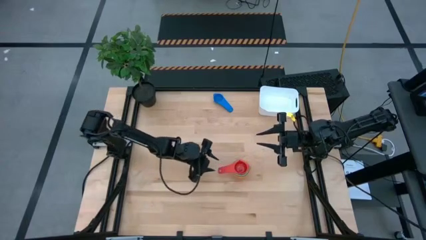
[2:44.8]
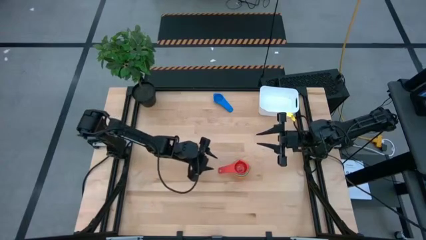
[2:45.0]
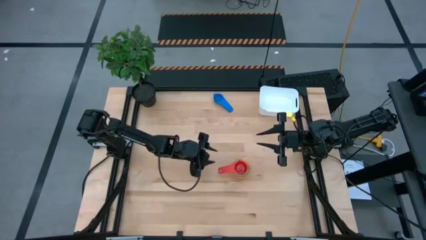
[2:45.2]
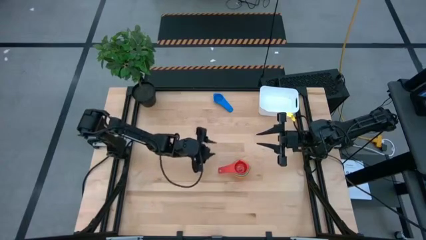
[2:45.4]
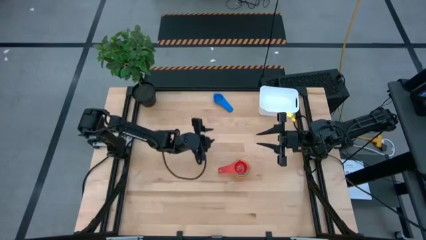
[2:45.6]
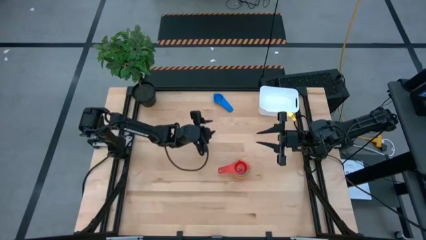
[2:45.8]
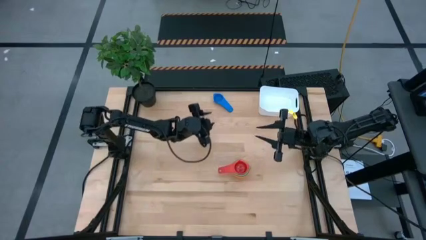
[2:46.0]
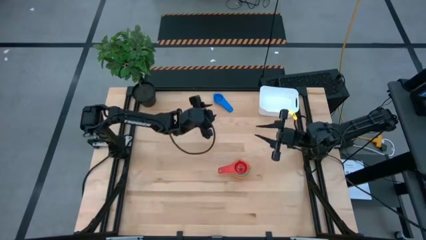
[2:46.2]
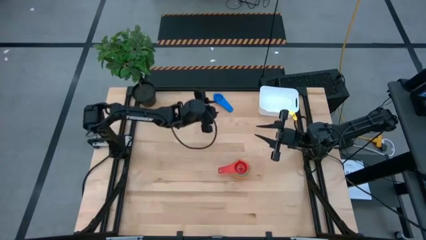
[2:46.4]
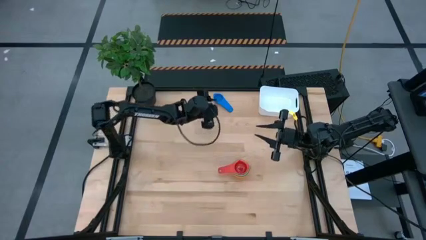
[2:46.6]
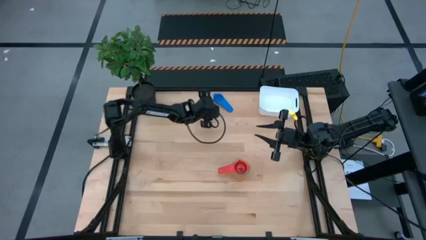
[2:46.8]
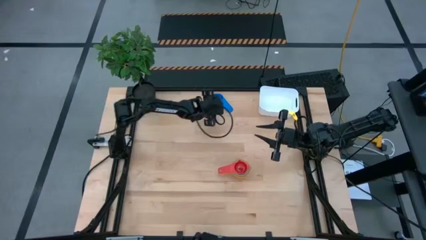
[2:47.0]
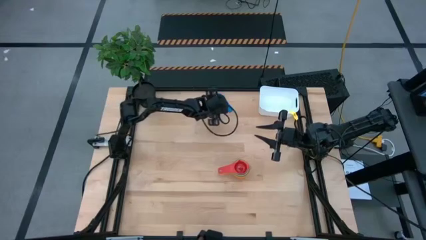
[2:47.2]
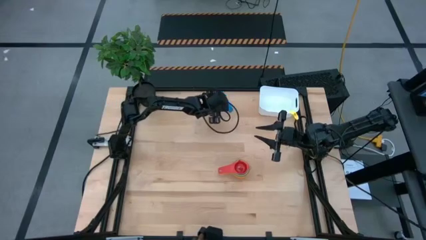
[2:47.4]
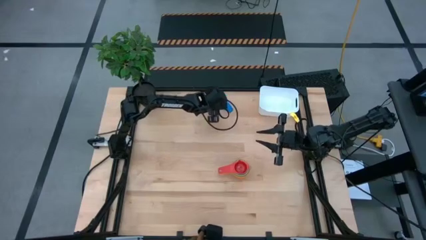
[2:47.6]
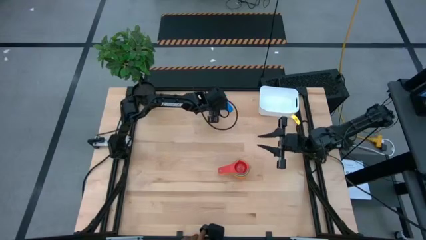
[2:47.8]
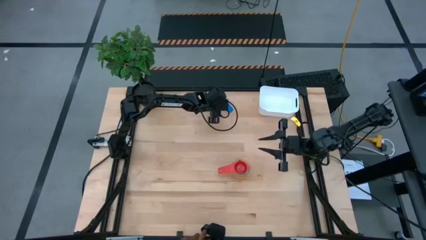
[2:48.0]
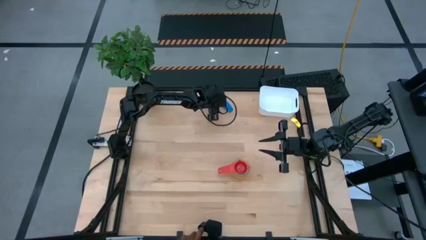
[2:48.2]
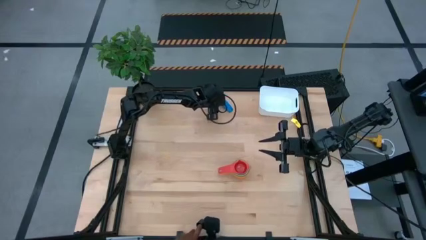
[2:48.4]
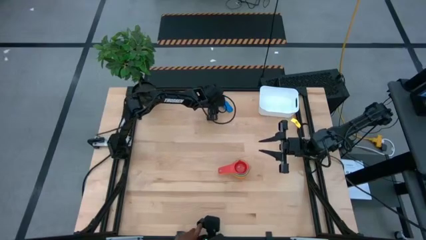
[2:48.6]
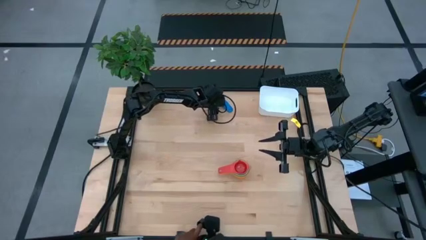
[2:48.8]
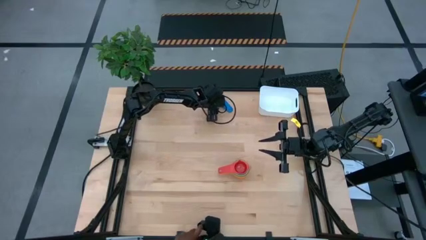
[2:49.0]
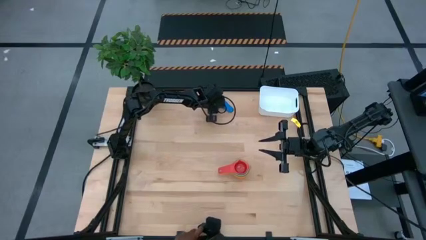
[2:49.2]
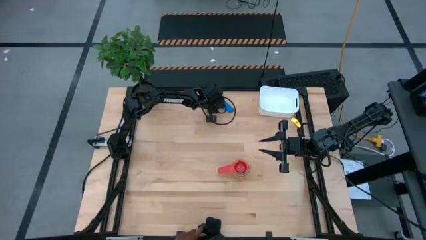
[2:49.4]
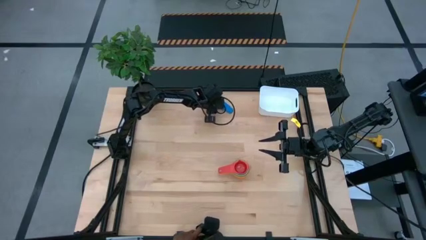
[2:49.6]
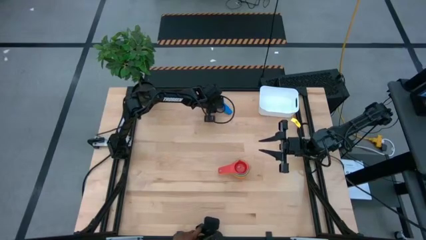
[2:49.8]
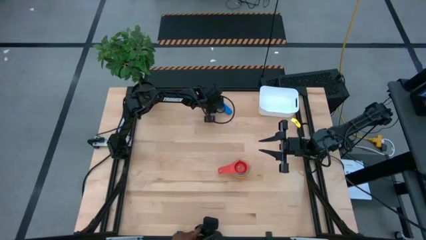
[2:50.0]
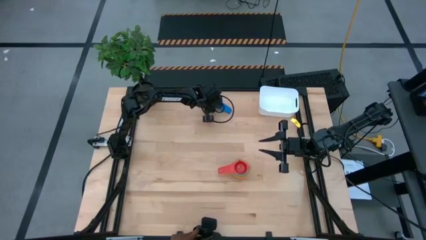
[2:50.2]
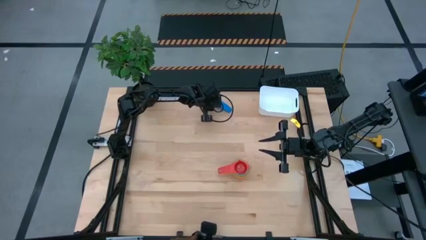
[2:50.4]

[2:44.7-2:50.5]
Task: Nest measuring cups in basket
Stack the blue measuring cup on top of the red measuring cup

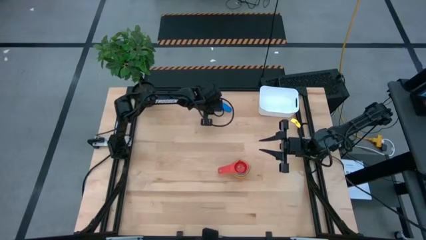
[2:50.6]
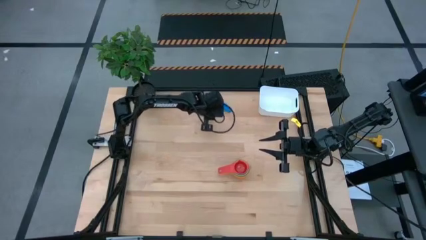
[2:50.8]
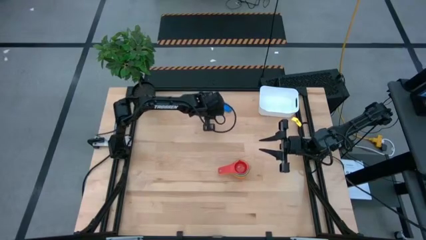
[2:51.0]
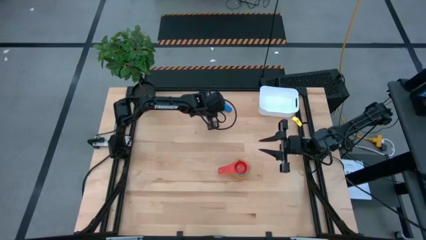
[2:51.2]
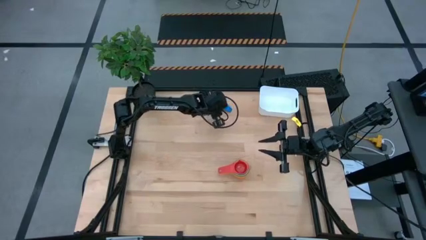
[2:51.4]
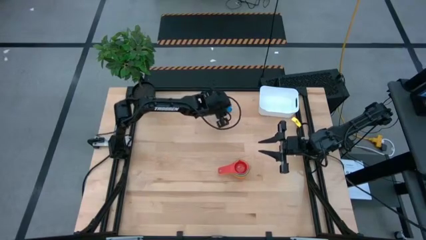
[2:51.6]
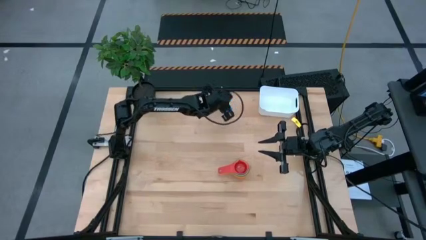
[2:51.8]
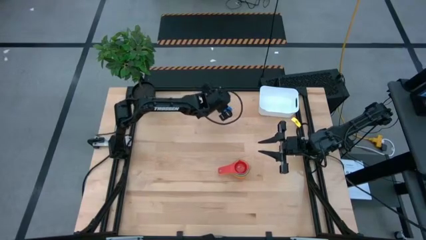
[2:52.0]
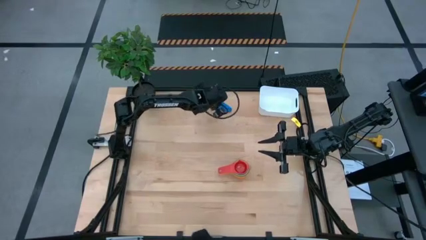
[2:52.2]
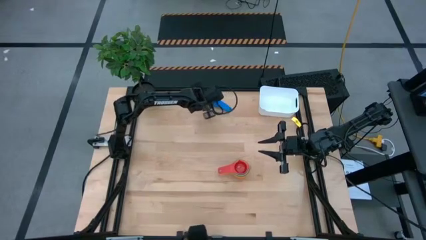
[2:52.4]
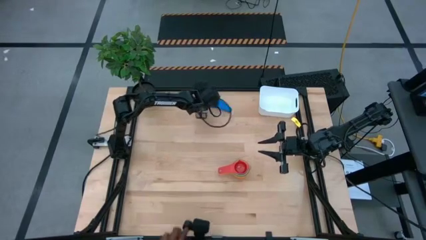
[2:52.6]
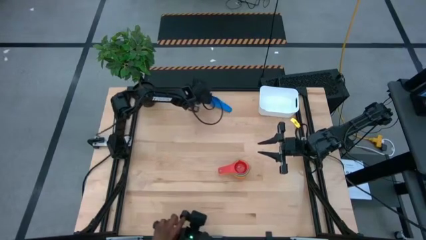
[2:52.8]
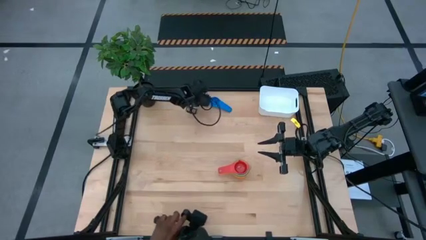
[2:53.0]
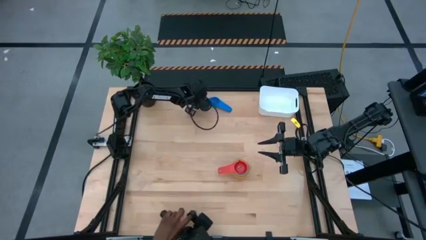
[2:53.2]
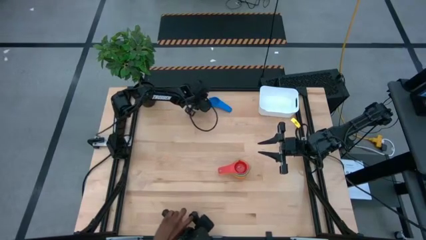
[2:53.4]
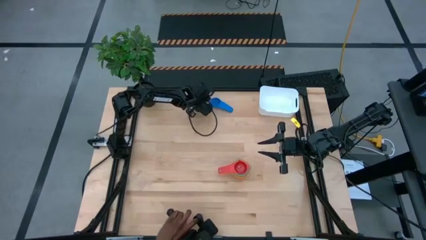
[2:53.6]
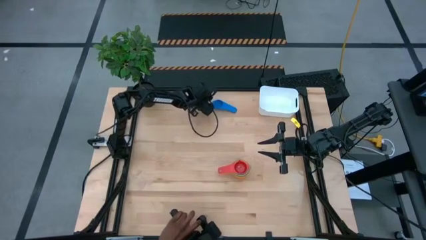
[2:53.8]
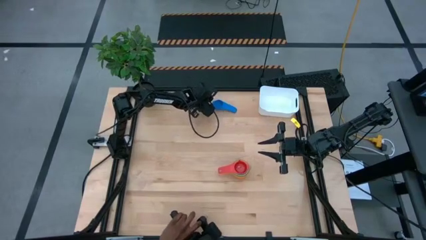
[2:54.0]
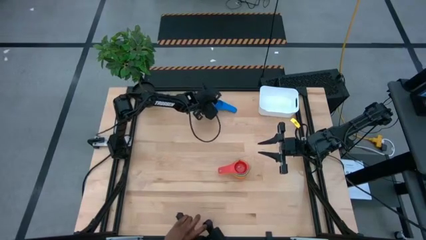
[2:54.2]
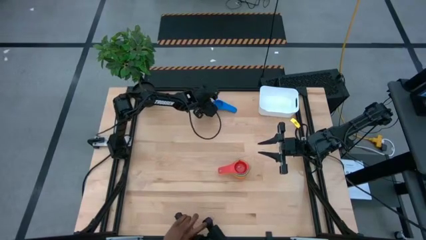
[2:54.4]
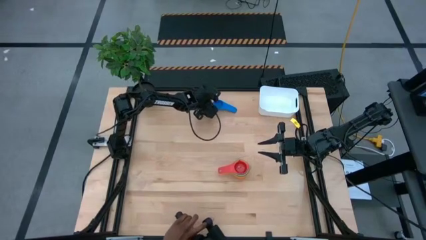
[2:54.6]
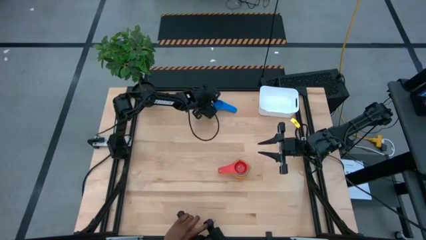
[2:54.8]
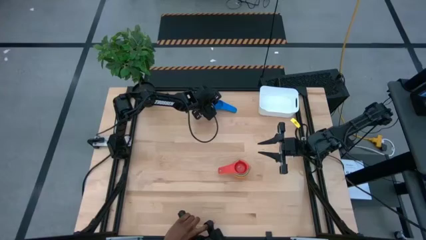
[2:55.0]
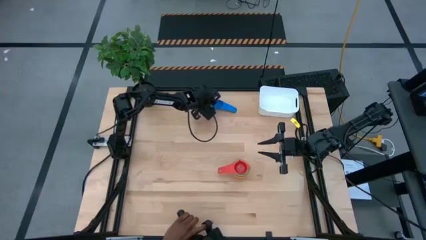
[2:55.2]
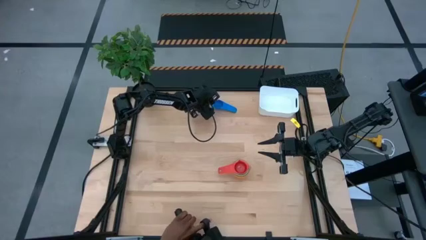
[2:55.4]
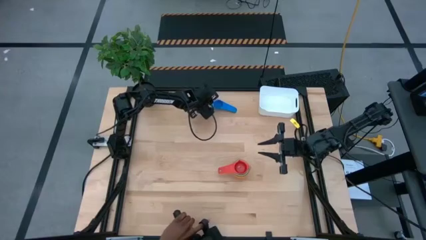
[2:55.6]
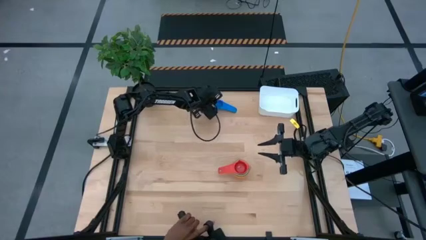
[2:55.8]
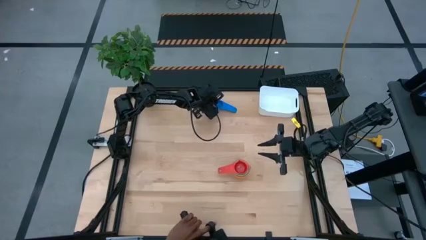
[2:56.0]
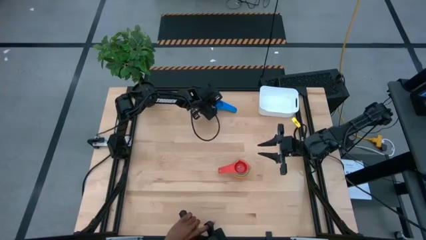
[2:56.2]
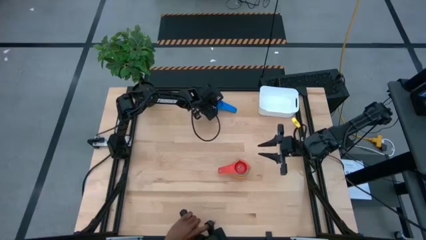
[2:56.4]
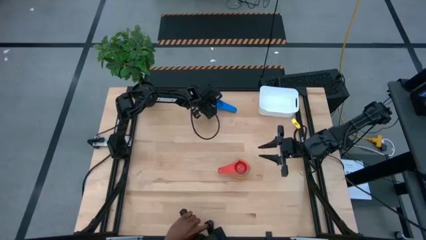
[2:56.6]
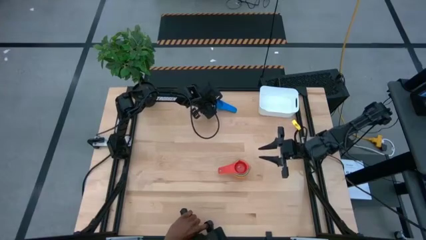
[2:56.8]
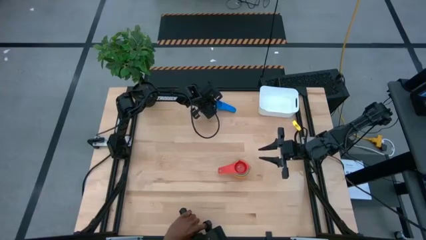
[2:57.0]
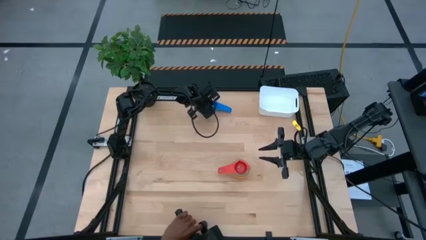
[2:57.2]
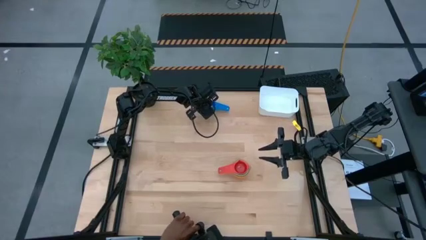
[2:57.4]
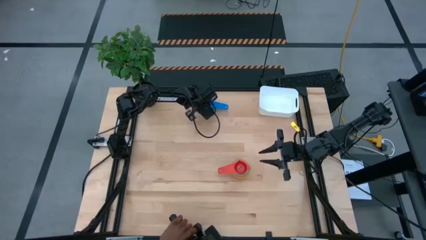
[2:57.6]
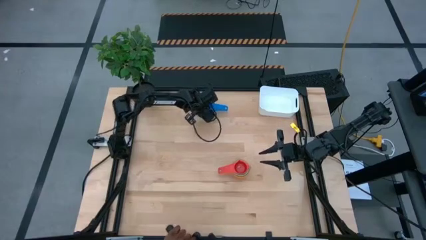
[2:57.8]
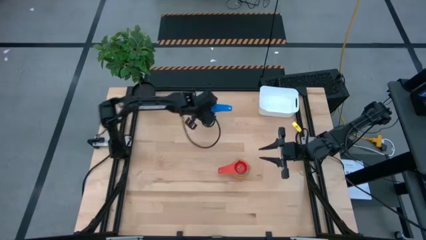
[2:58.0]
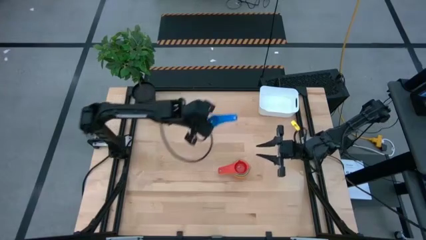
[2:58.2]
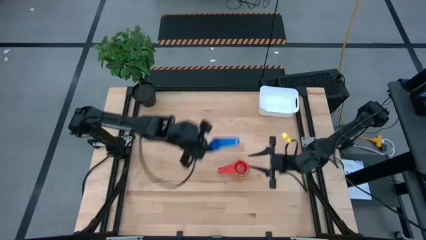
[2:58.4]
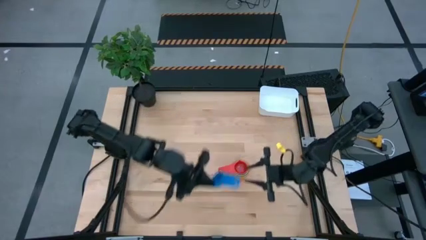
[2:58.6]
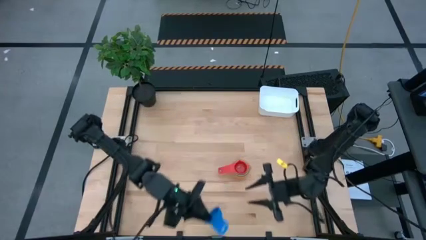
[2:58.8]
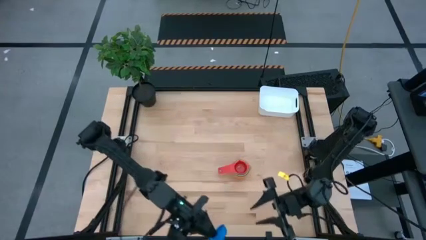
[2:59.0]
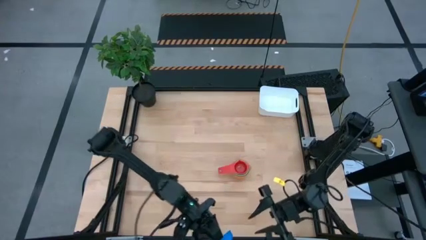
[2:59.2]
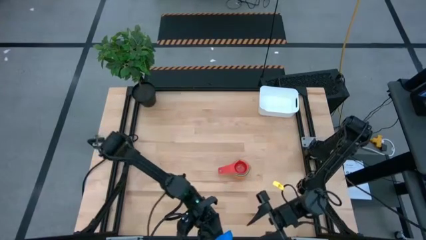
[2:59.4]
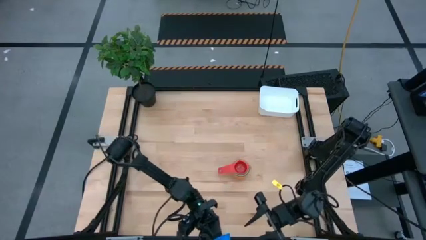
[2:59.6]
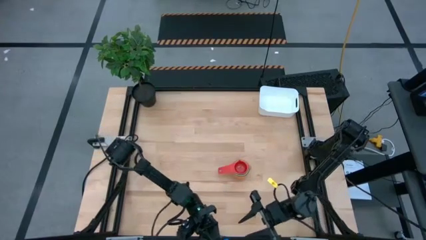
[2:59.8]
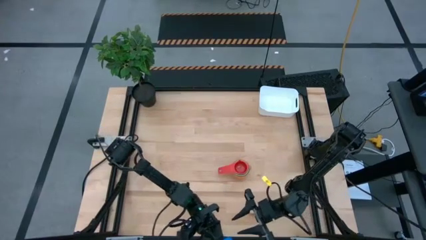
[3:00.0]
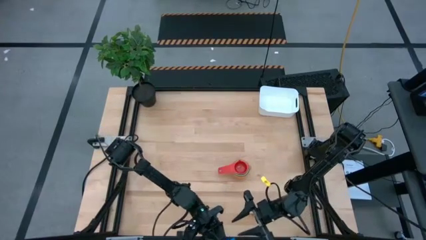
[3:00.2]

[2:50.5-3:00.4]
Stack the blue measuring on top of the red measuring cup

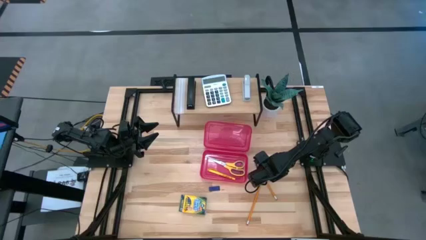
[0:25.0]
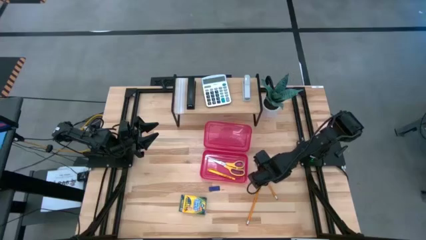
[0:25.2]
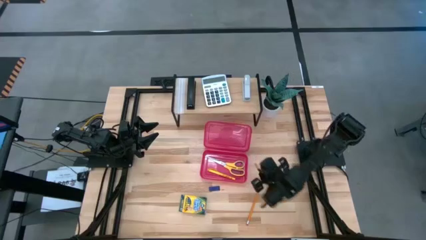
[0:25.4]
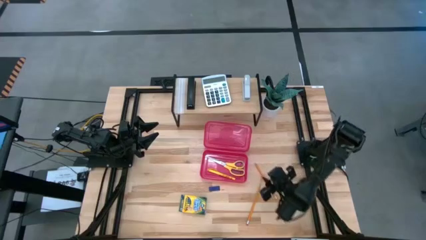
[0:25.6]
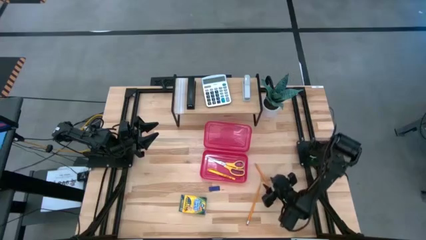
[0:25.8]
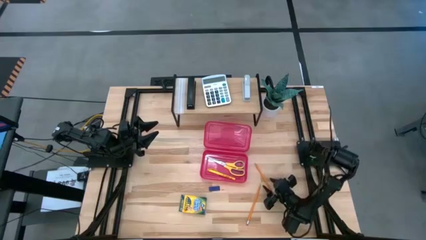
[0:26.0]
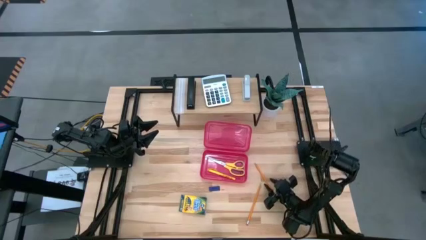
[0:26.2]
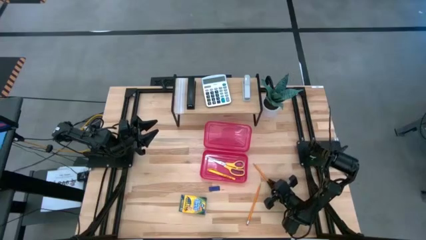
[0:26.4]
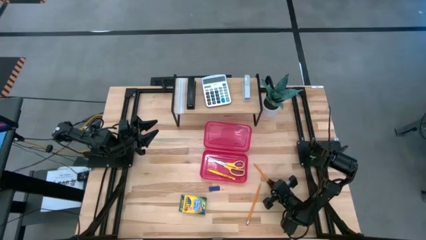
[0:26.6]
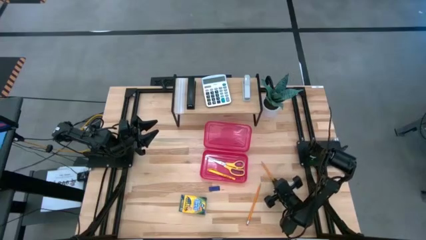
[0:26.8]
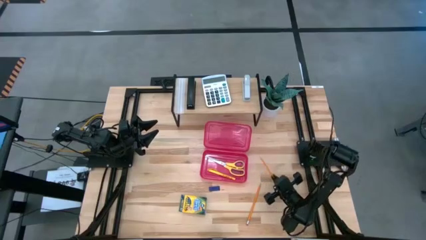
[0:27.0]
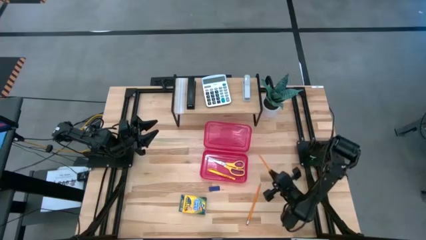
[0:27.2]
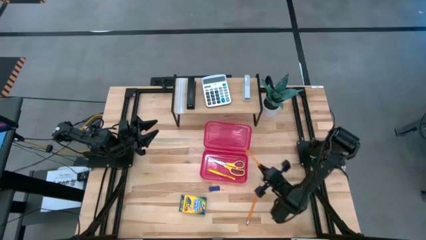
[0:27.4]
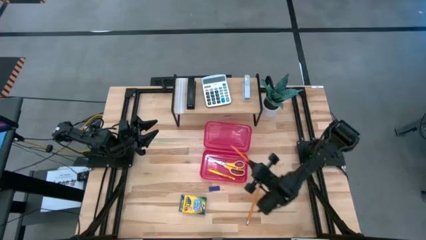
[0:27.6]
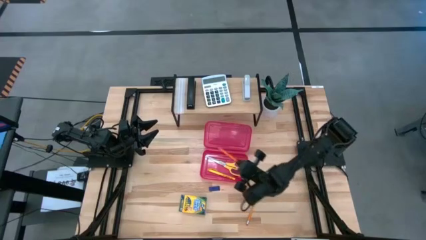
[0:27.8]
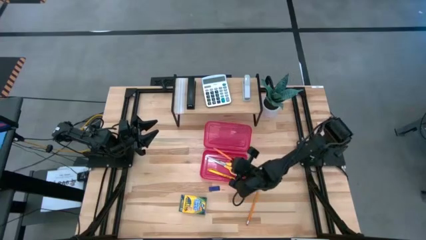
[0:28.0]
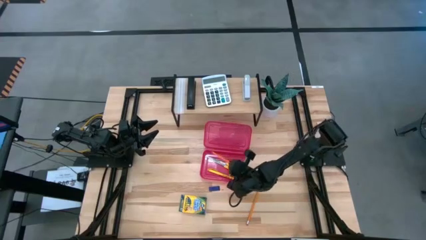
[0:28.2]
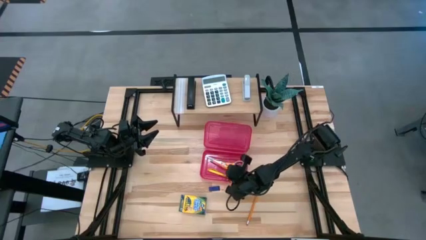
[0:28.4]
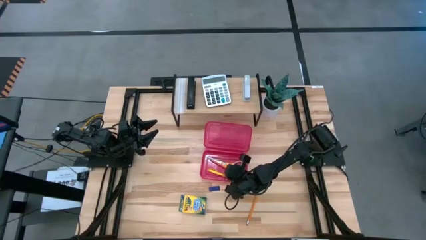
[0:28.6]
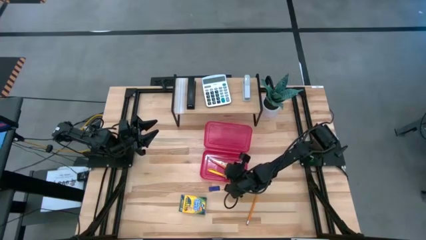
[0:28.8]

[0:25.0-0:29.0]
Task: Pack school essentials
Put the top orange pencil into the red supply box
